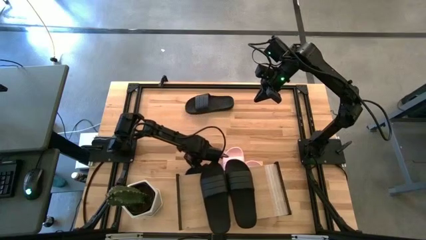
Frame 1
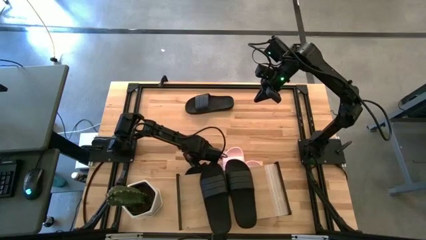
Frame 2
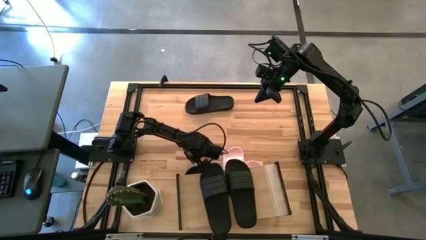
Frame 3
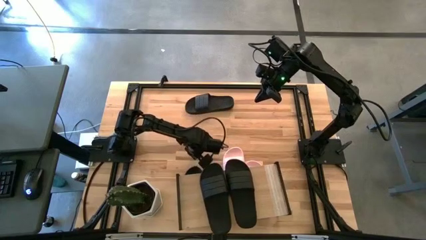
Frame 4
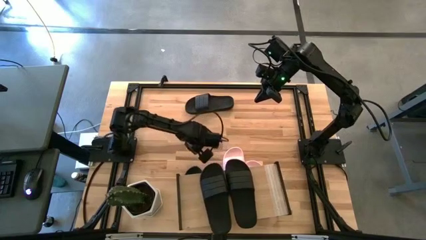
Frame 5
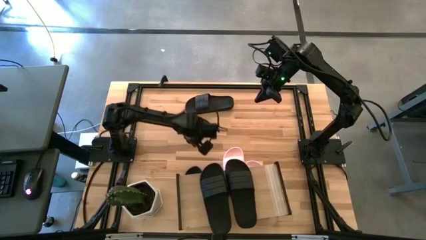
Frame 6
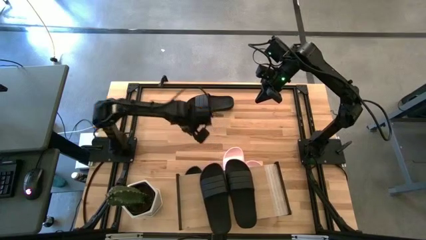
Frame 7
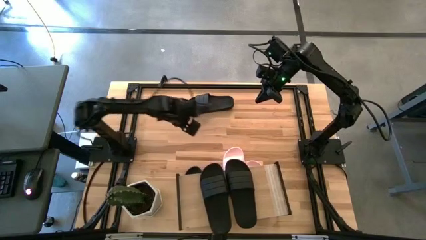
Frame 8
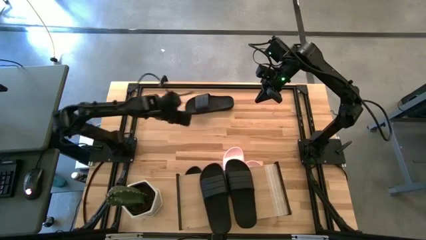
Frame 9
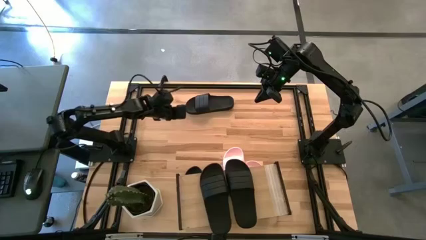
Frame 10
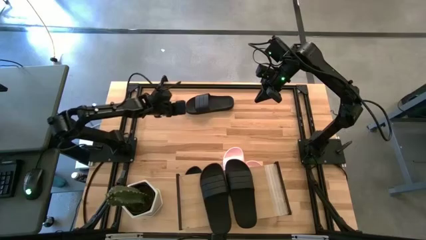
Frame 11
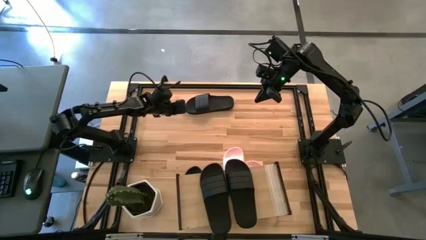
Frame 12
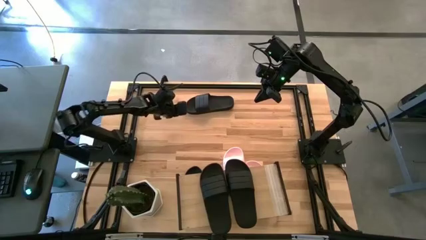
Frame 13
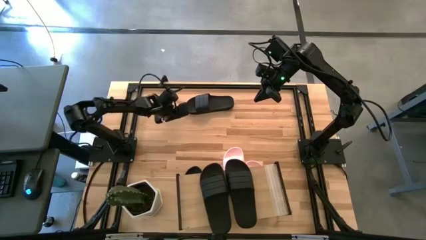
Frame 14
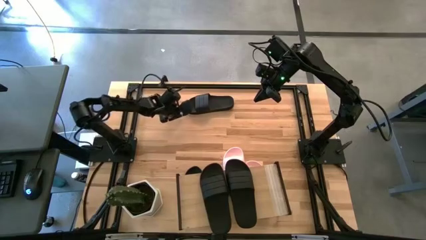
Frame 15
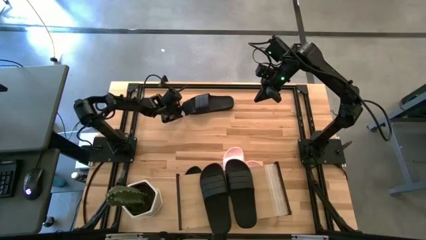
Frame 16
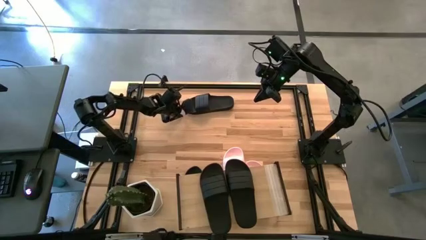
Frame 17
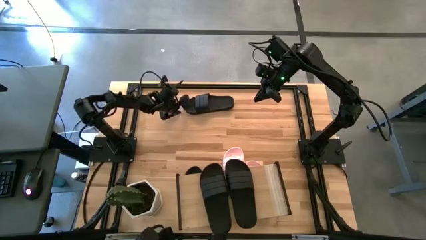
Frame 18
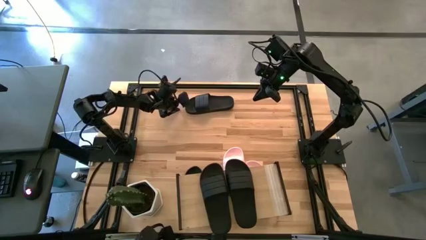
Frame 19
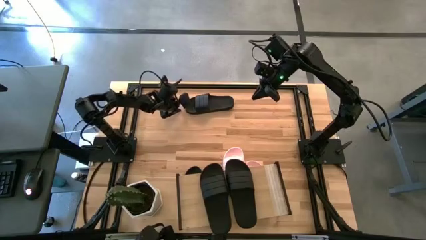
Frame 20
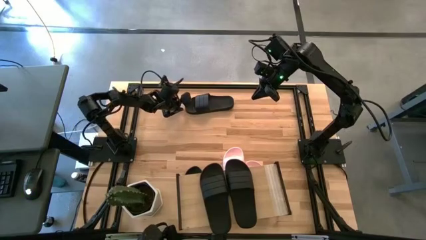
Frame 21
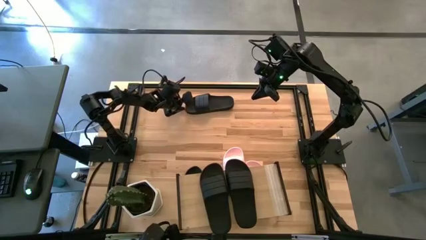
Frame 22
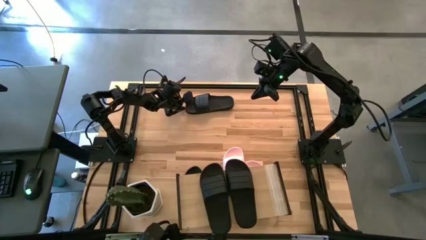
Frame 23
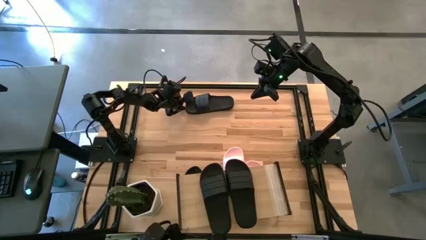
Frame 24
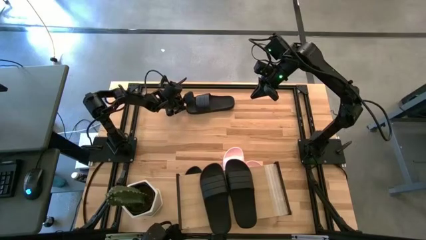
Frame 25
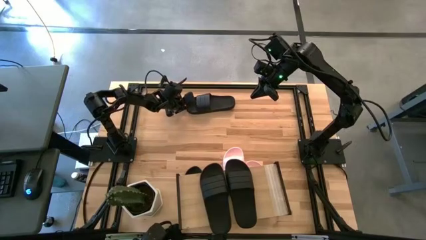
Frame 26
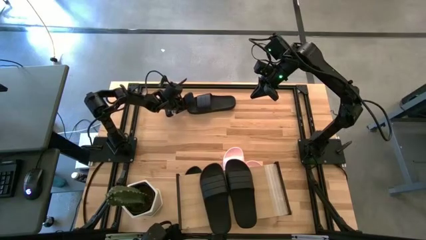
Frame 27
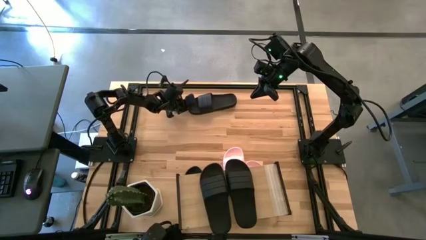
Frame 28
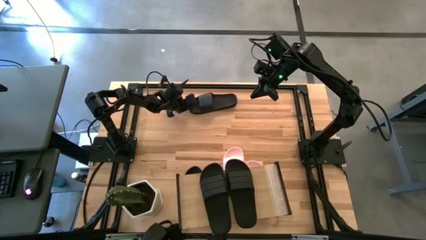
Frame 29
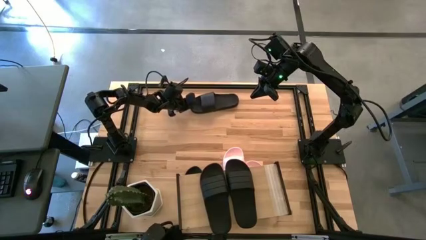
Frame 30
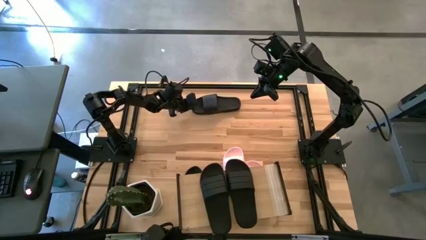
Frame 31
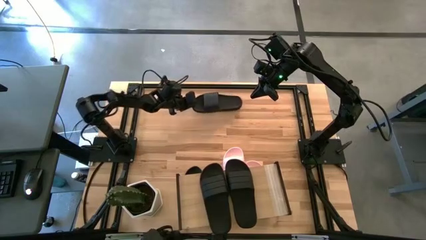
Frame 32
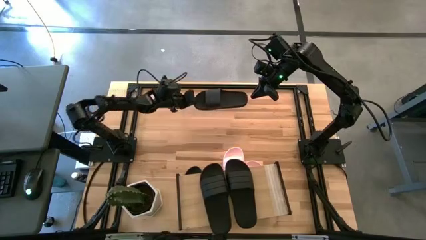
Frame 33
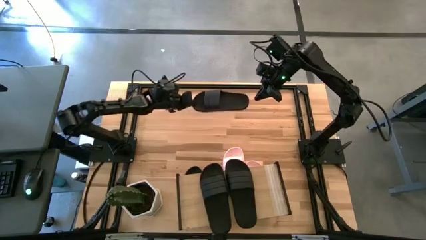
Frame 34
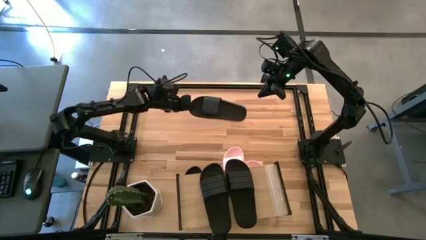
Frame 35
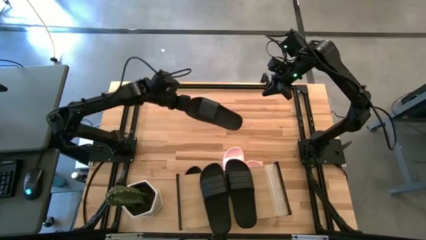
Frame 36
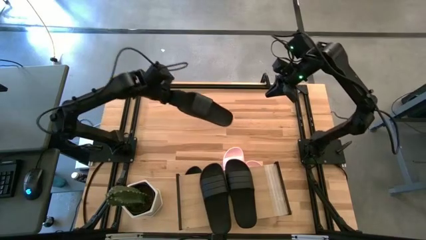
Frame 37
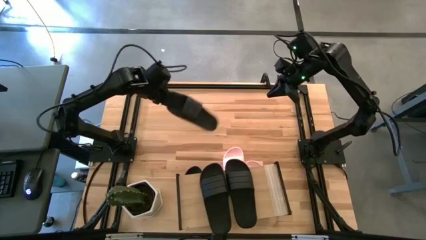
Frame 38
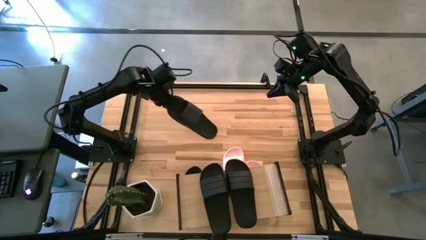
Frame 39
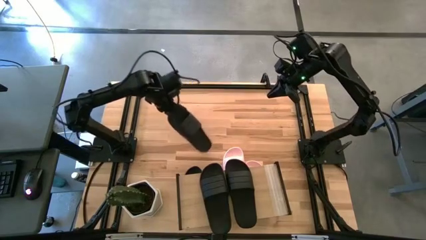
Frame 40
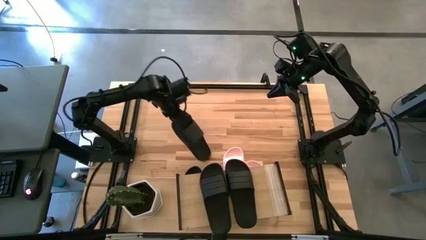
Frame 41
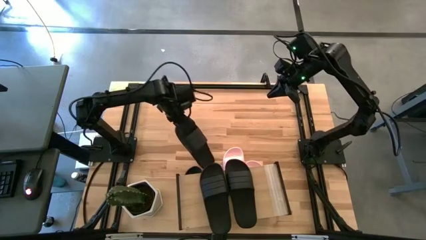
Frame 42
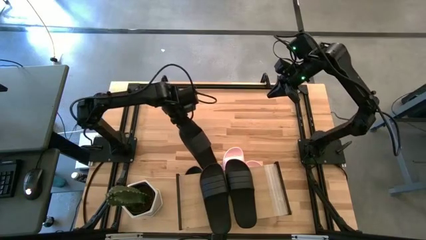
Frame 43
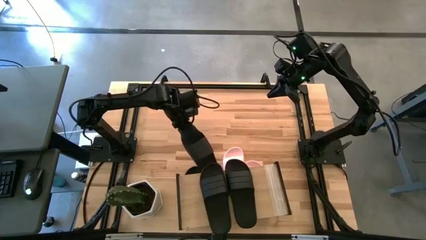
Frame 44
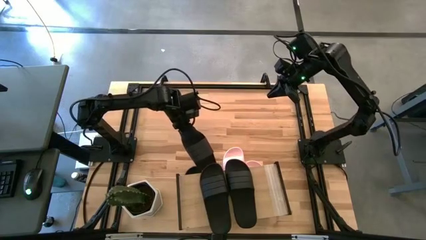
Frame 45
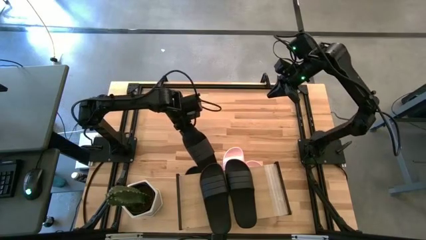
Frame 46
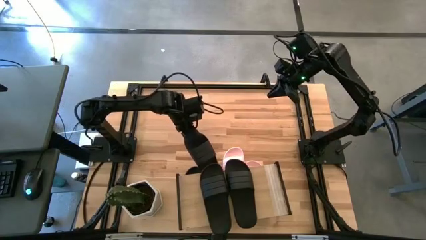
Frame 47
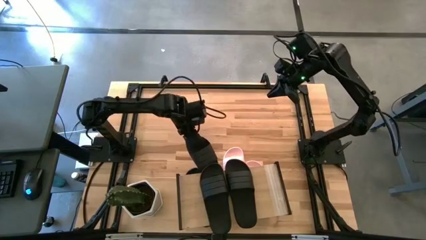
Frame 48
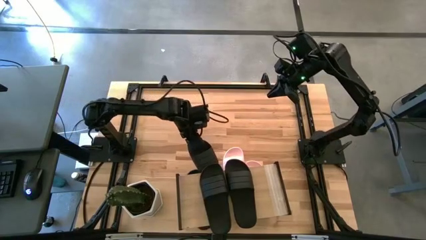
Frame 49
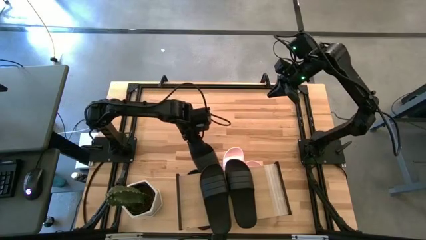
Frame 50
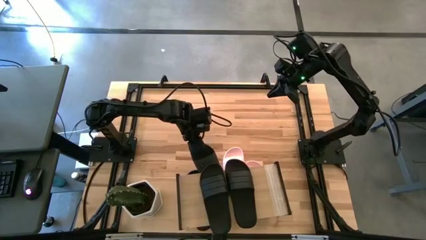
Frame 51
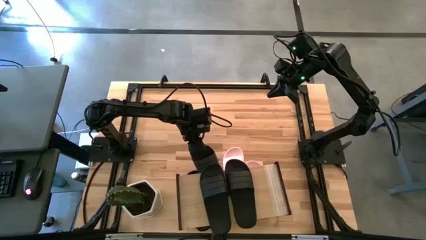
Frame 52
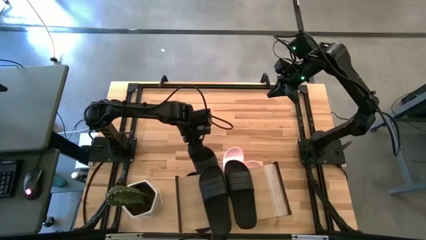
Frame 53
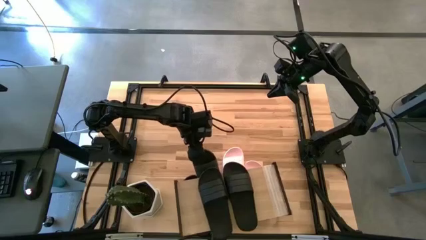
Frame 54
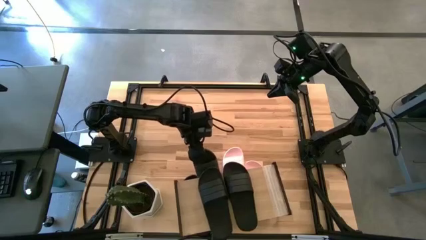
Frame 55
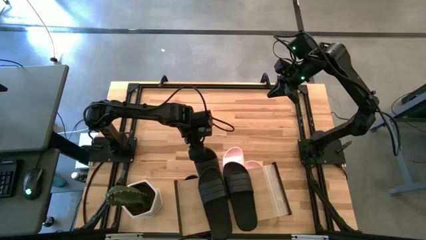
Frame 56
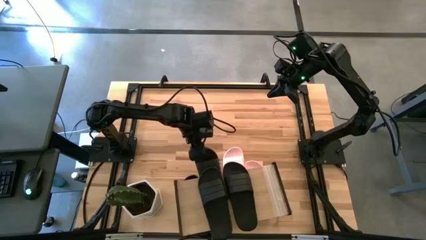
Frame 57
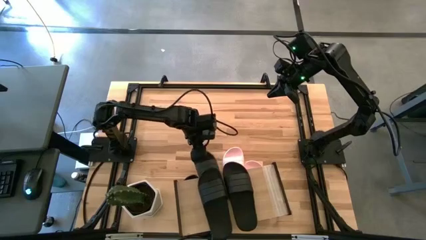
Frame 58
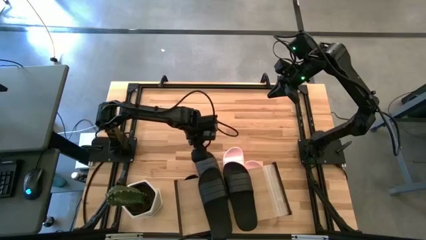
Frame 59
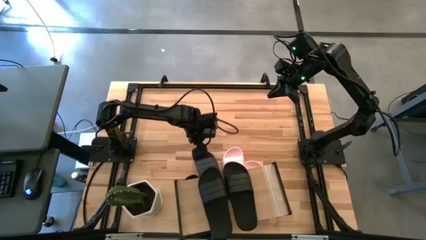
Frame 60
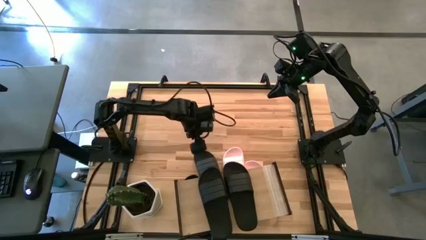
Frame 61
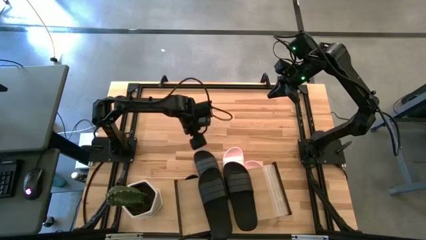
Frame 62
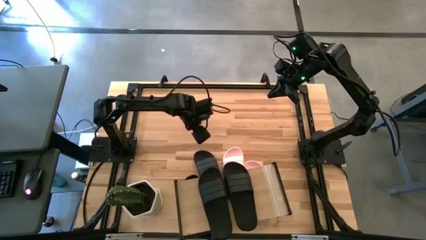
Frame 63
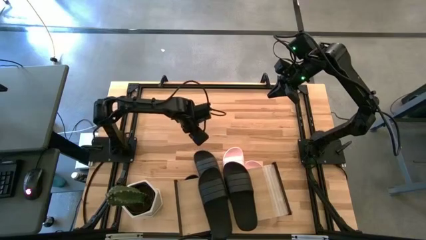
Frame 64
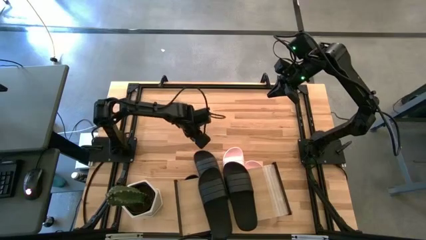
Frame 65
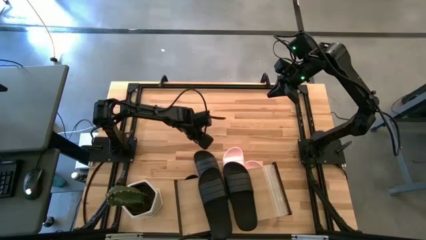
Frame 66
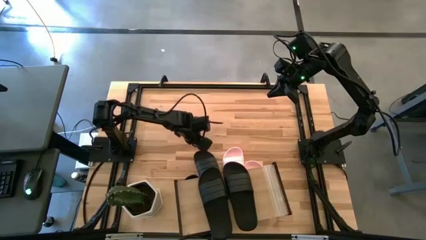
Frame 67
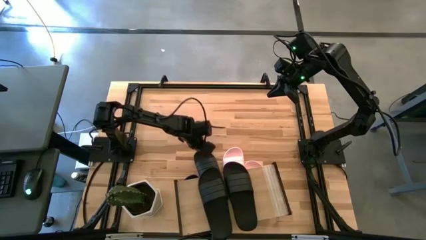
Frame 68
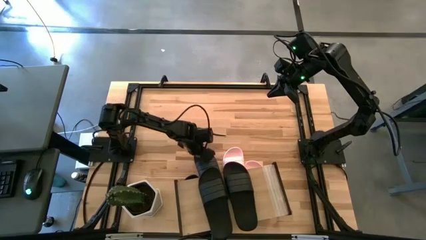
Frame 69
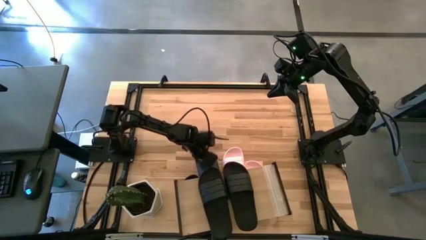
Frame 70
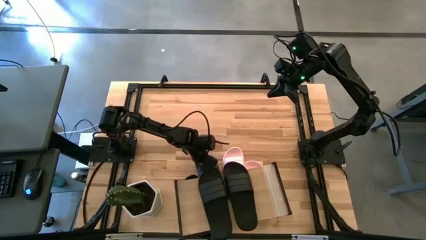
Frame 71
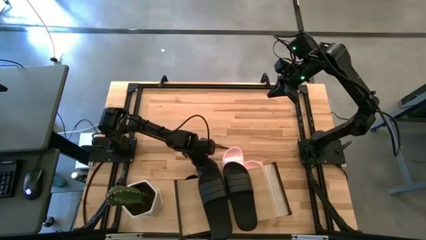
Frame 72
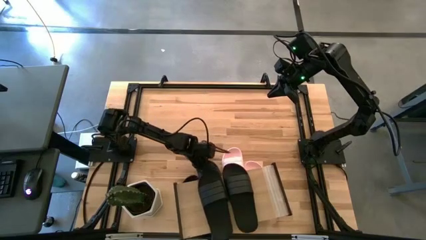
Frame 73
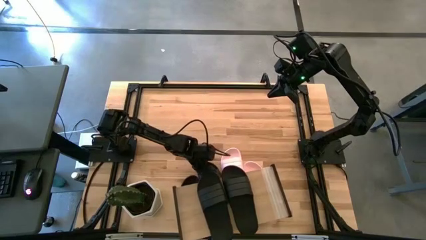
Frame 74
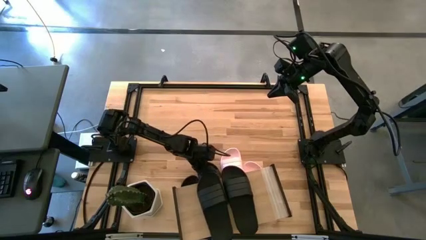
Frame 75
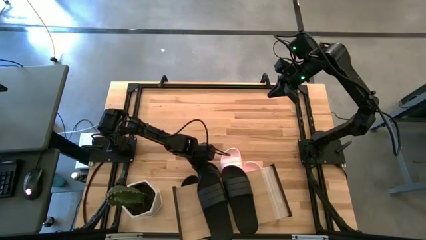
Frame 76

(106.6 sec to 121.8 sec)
Task: Pick and place slides into the shelf
Put the black slipper under the shelf
